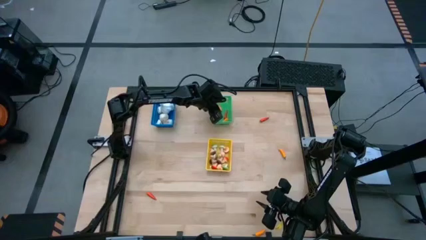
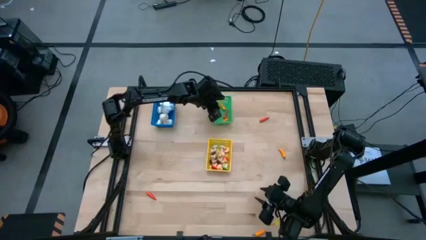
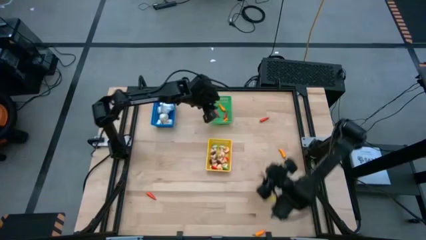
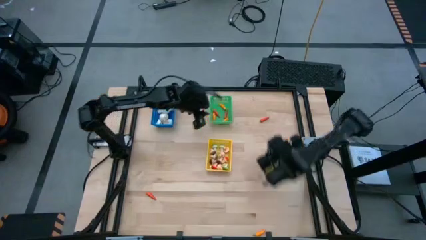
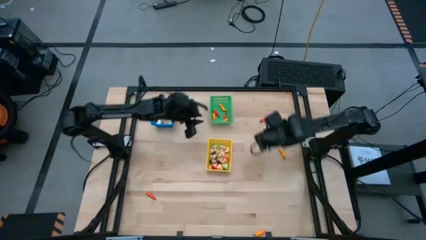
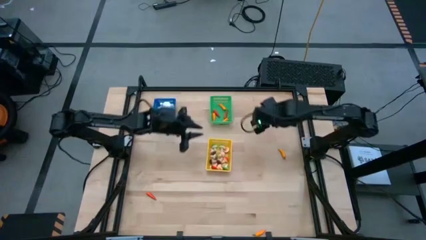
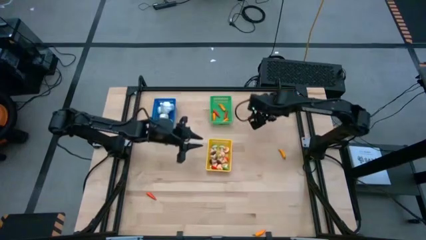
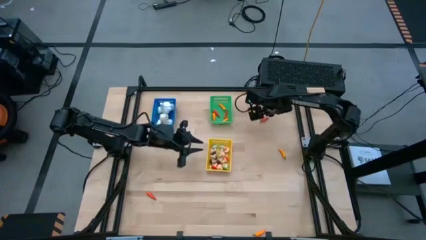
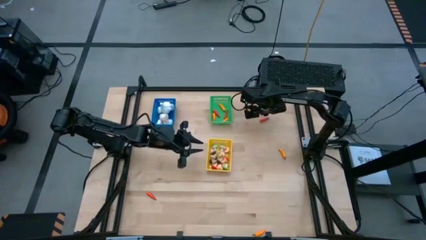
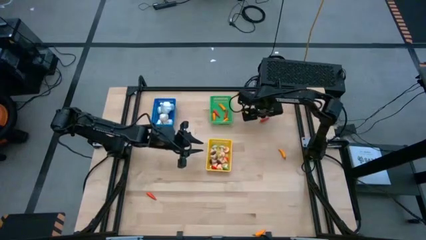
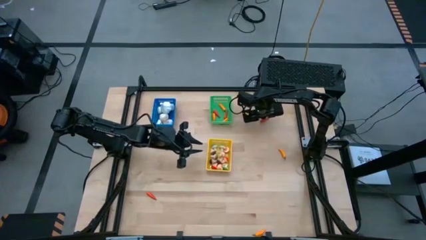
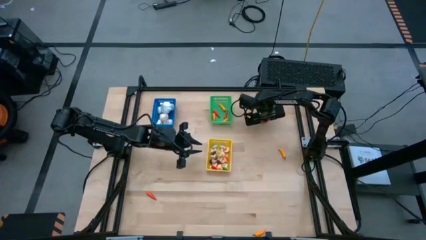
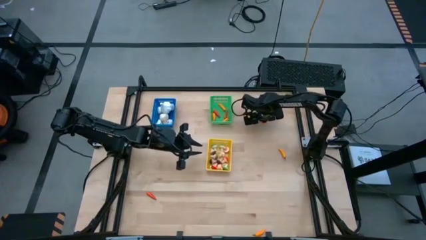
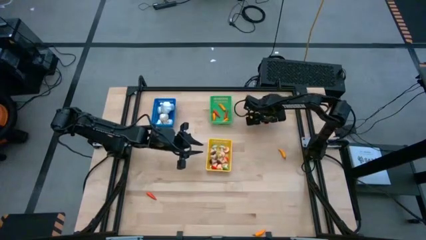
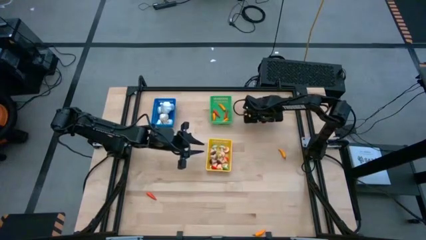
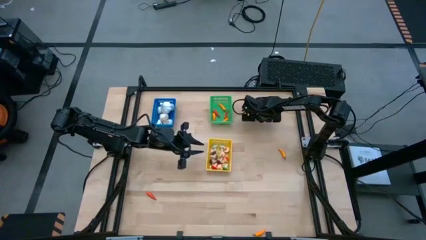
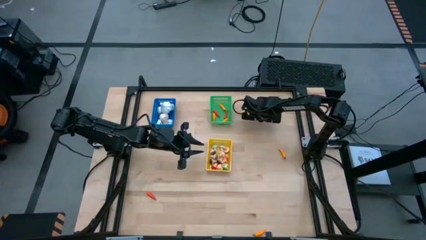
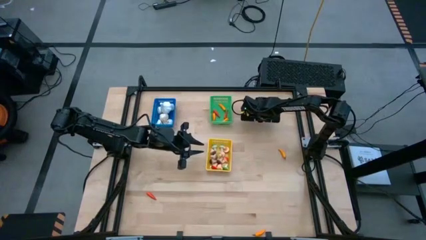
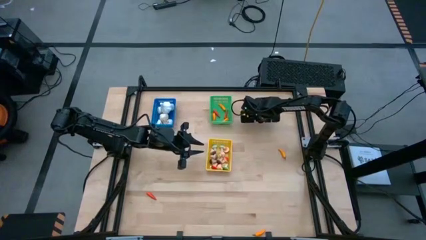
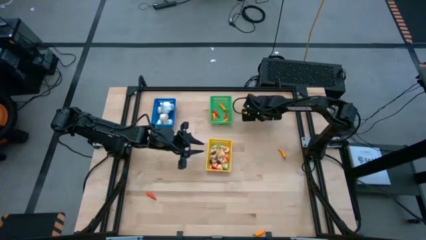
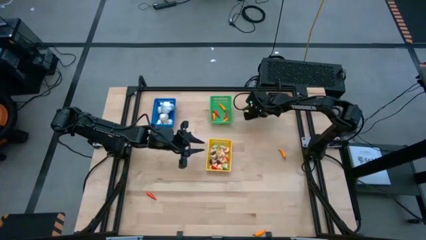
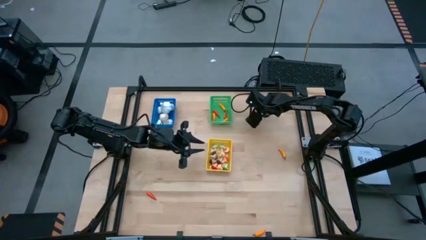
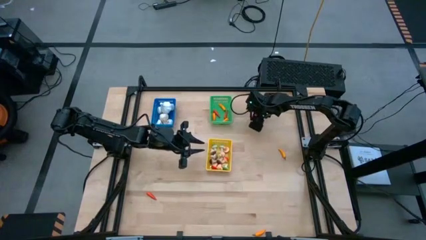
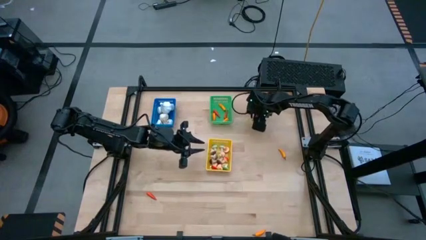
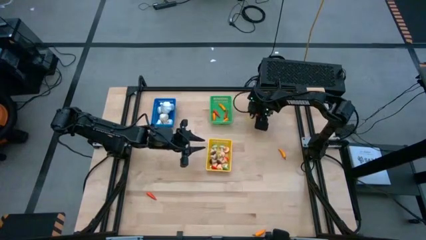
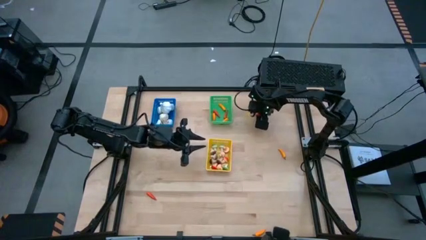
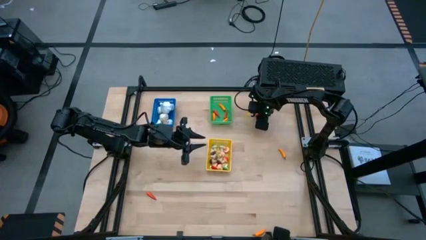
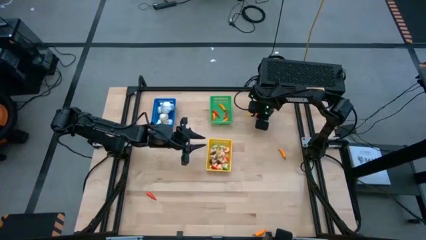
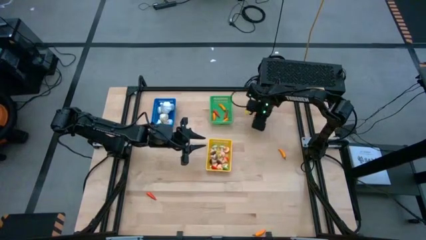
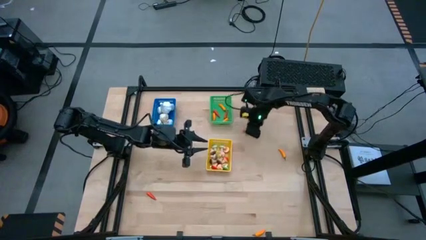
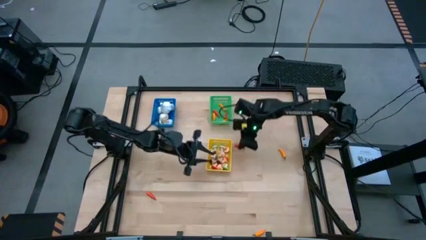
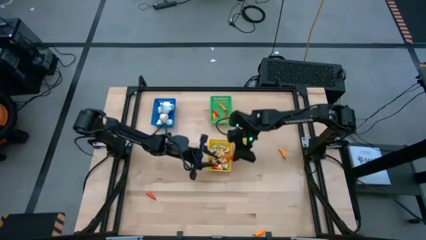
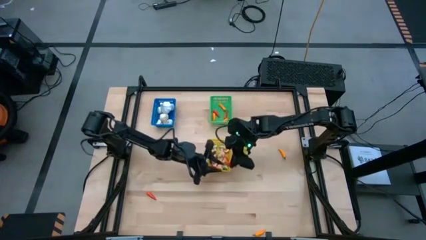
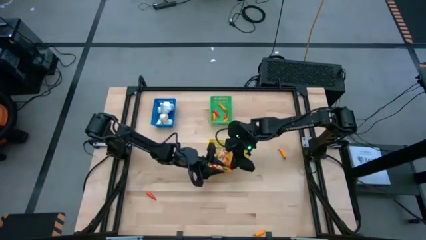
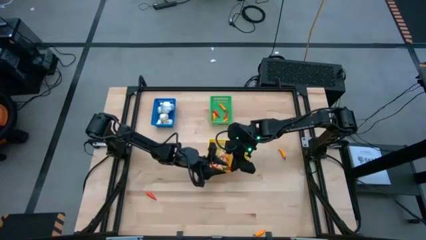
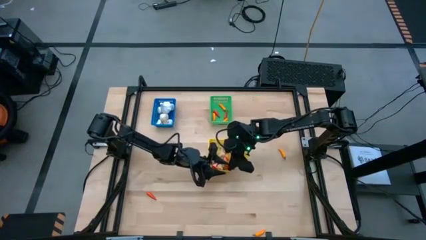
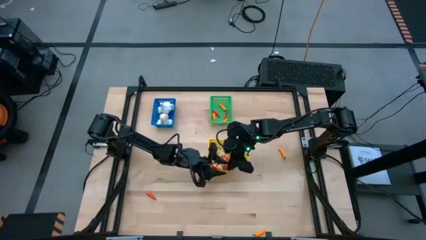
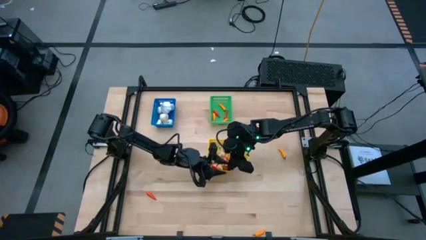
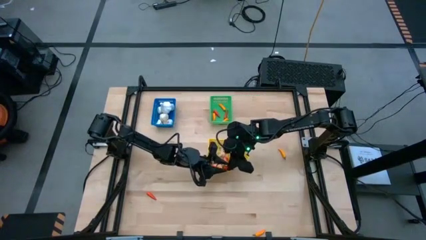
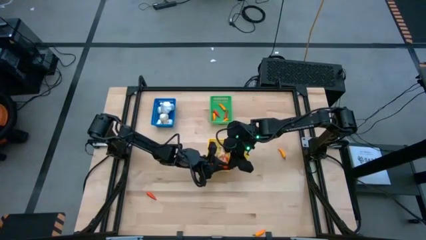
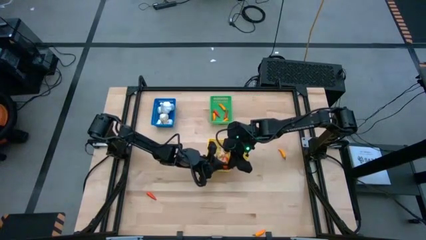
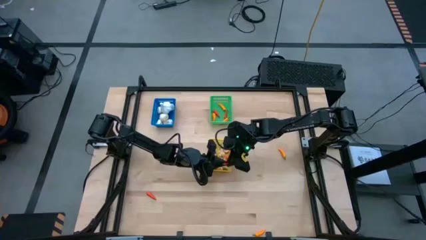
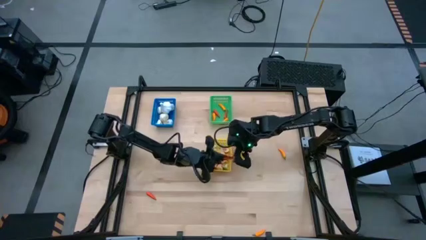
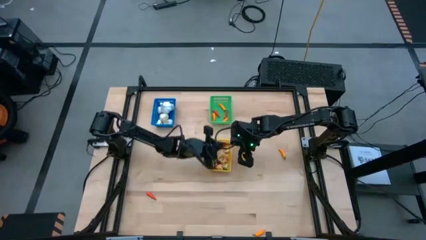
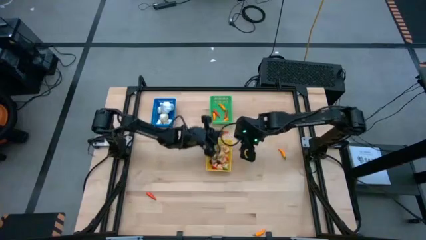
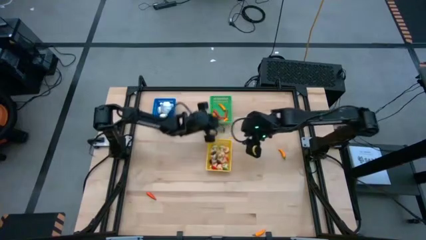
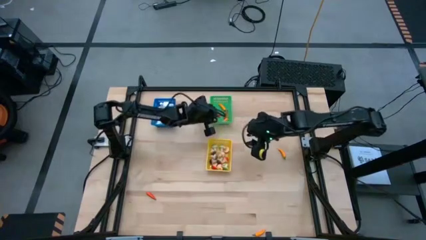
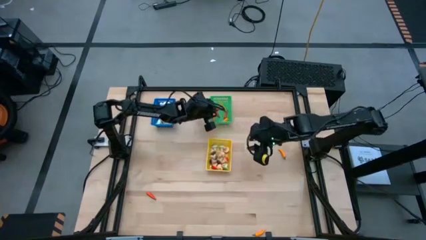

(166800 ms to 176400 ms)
Task: Sort produce into baskets
Put the red chili pepper into the green bin

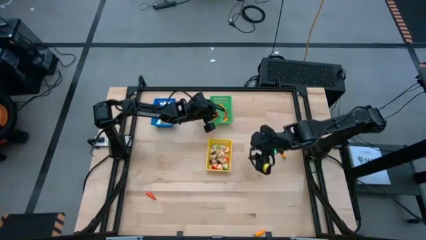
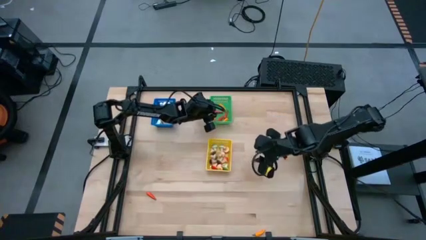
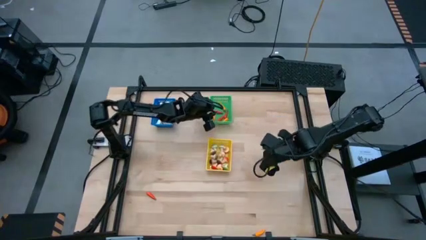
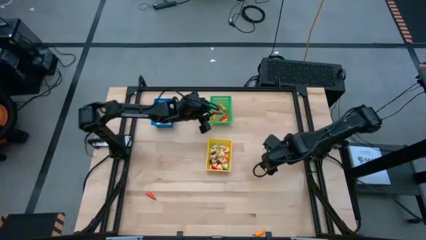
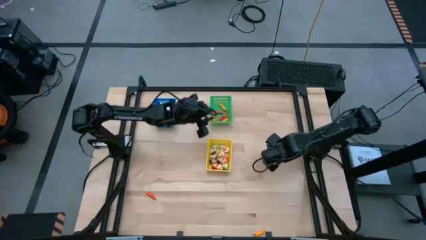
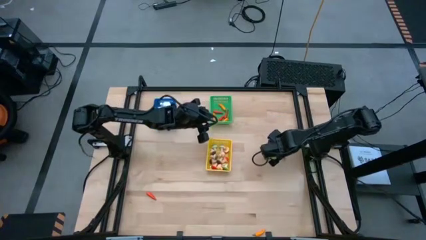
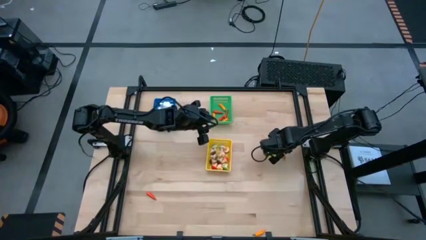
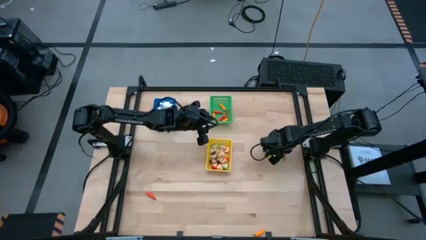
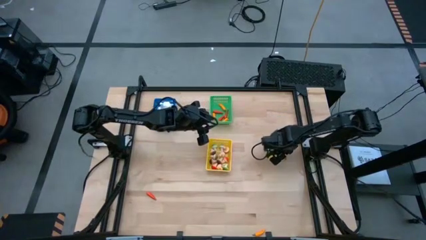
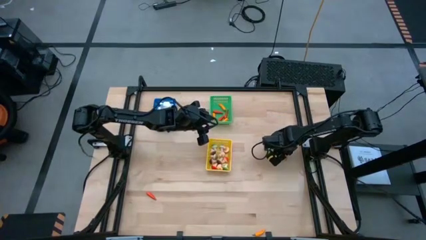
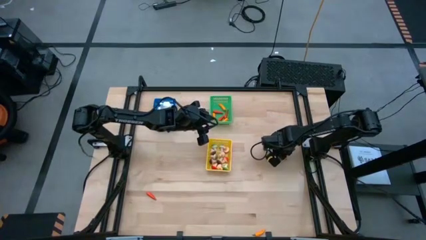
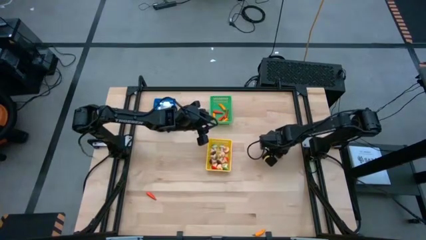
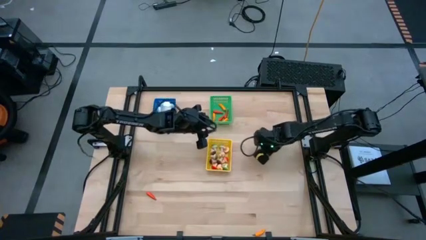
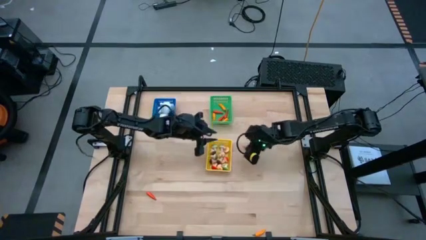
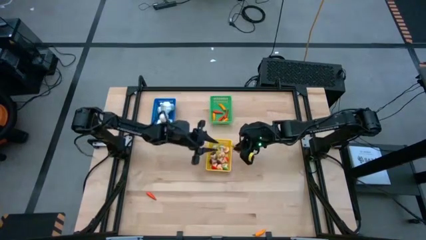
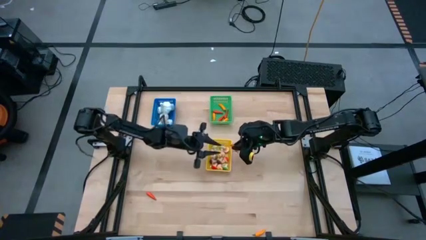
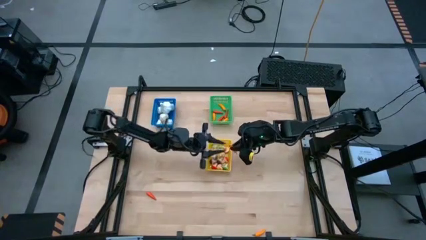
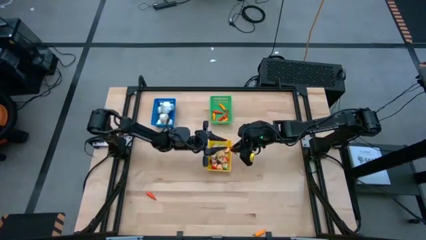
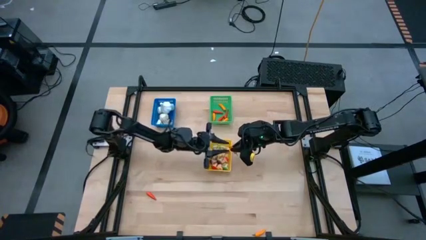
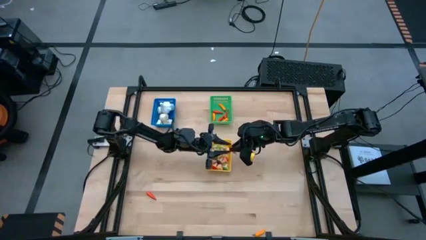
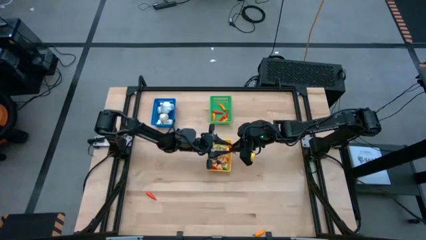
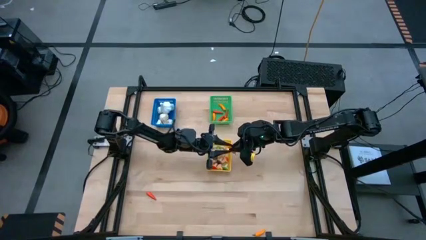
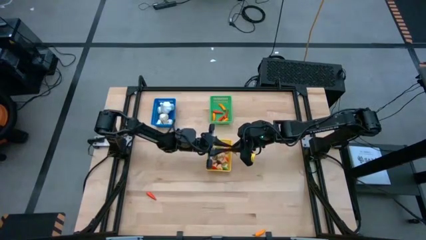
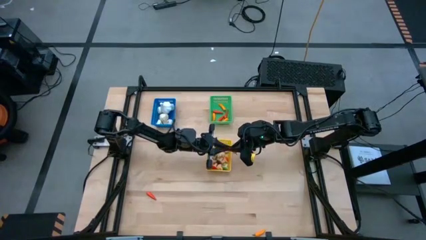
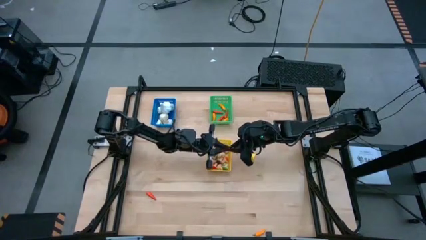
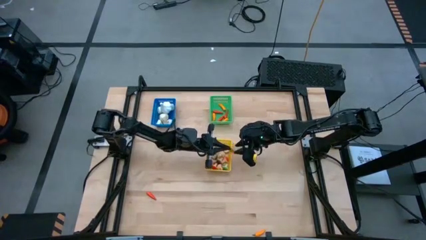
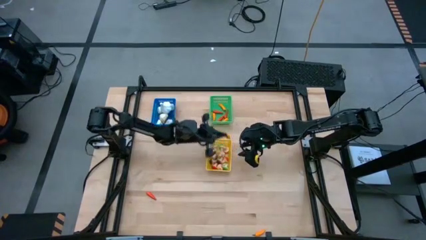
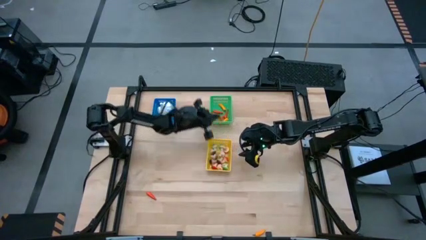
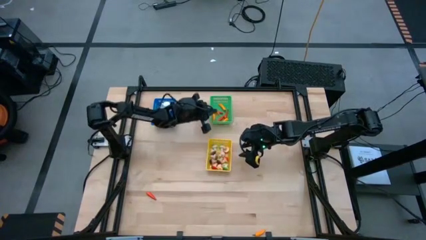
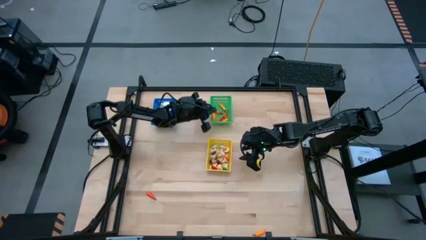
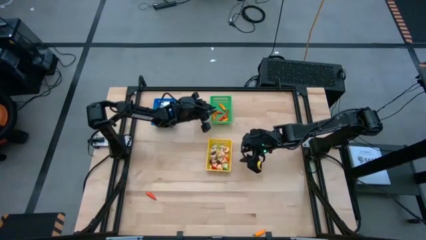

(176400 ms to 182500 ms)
Put the orange chili pepper into the green bin

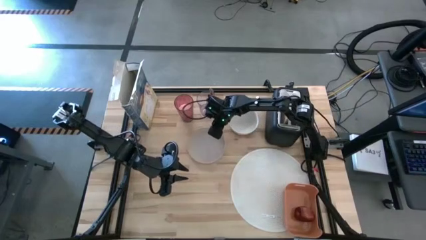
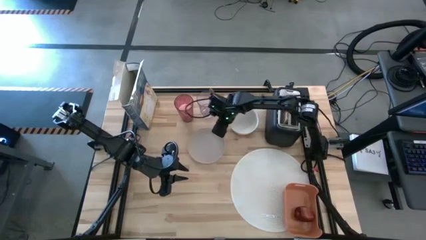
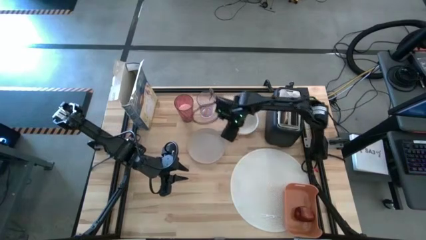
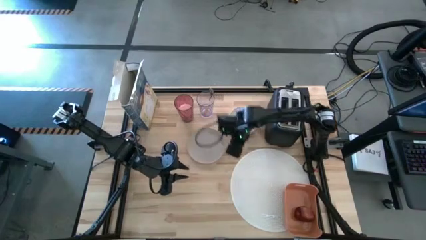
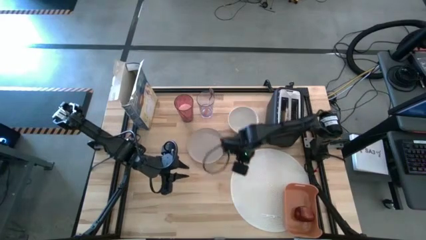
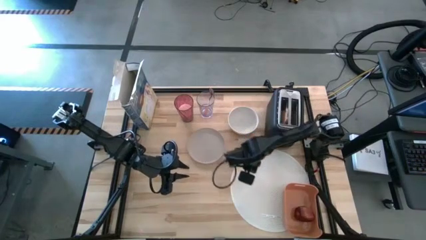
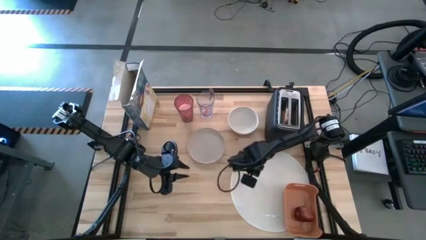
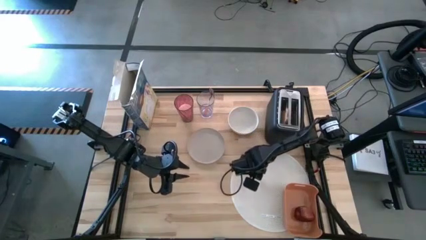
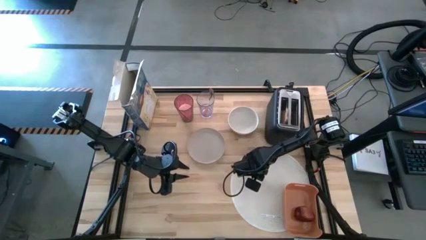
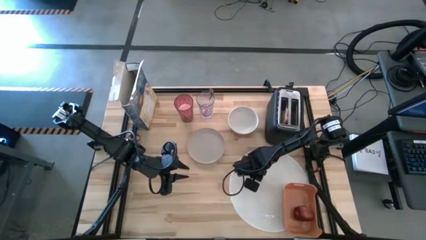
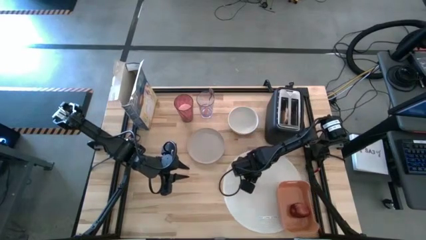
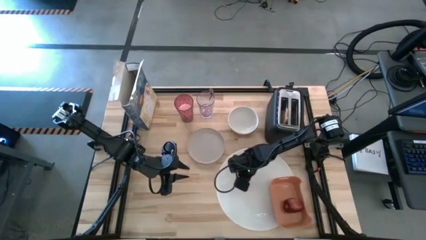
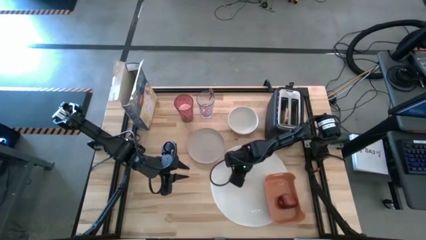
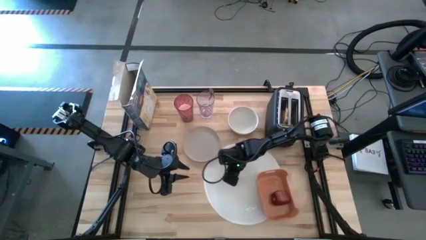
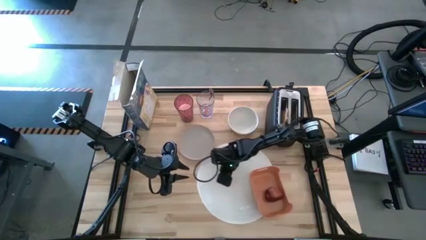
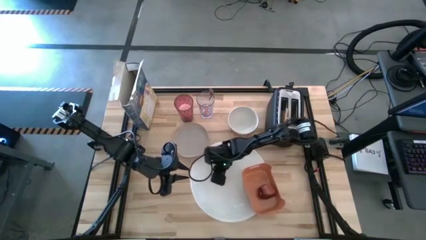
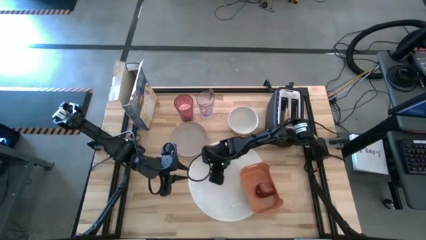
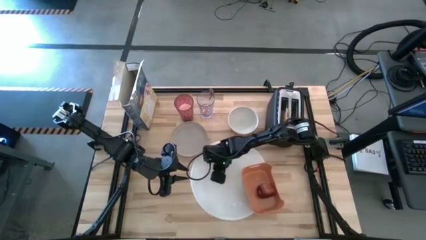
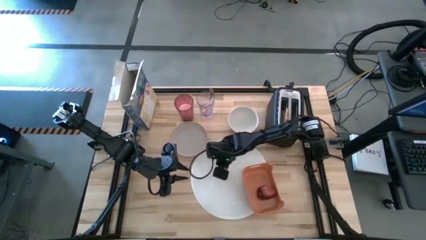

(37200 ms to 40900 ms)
Task: Arrange a breakfast setting
Move the white table mat to the center of the table
